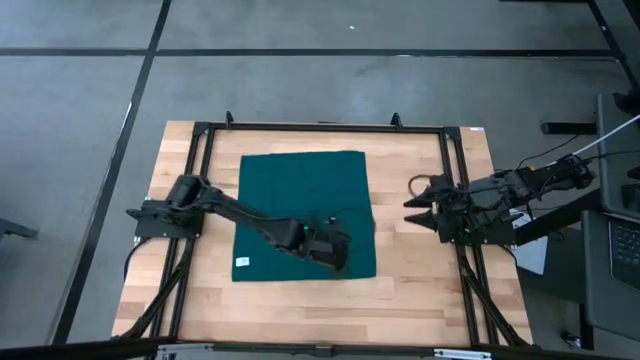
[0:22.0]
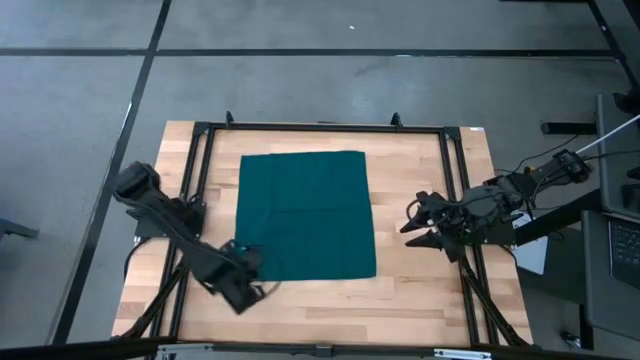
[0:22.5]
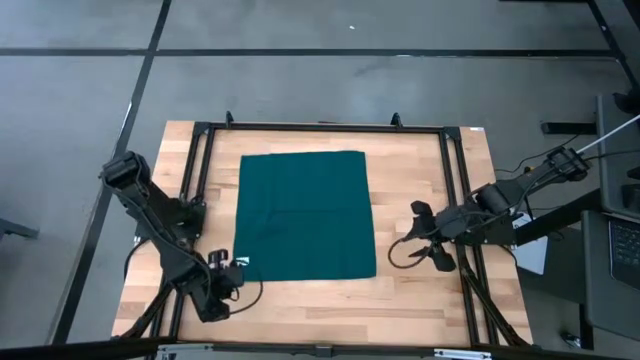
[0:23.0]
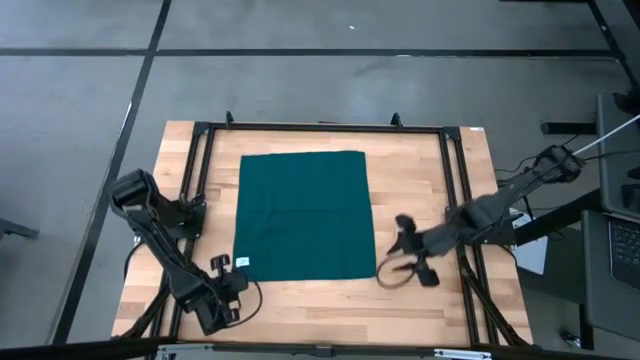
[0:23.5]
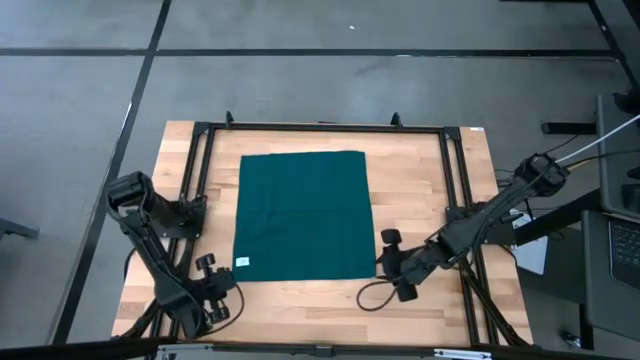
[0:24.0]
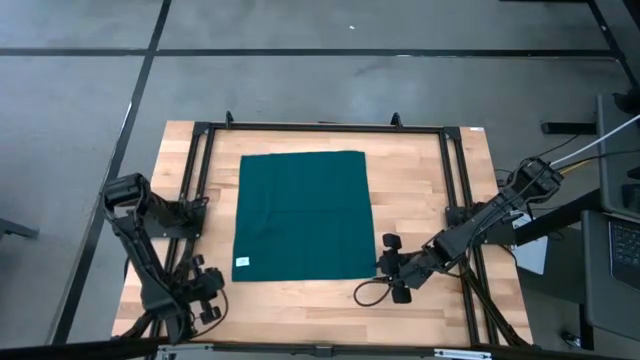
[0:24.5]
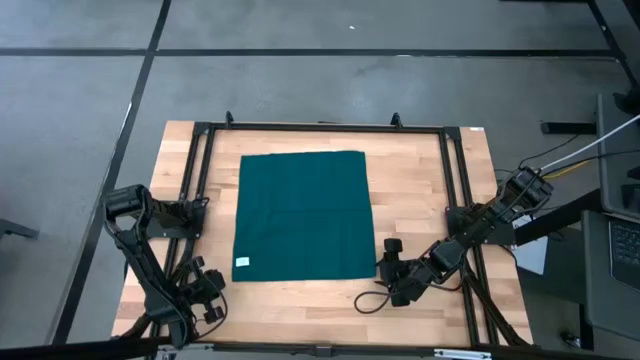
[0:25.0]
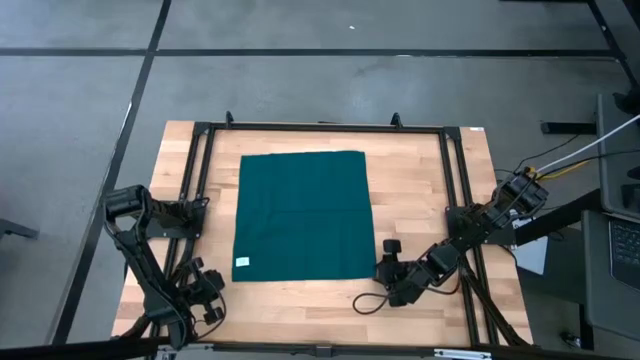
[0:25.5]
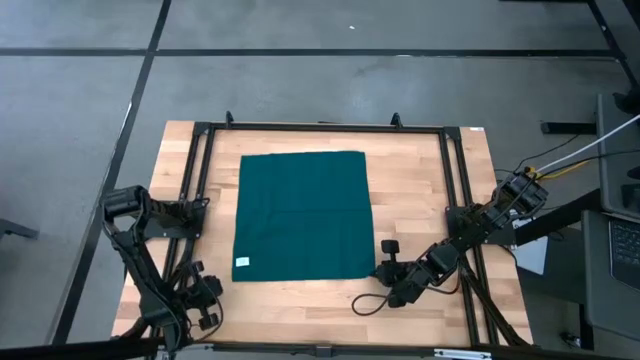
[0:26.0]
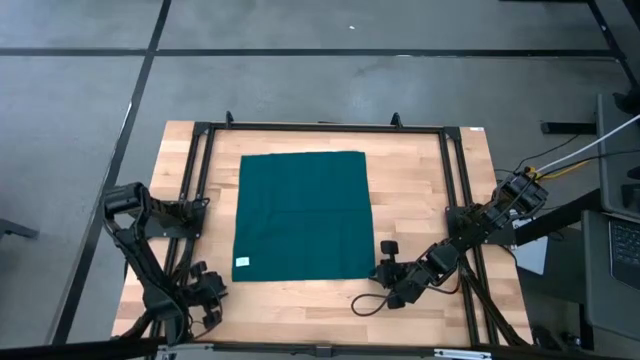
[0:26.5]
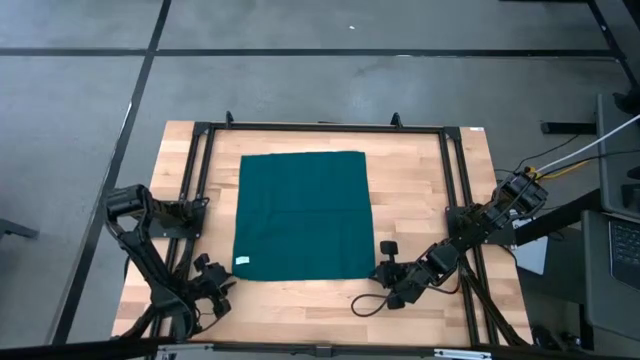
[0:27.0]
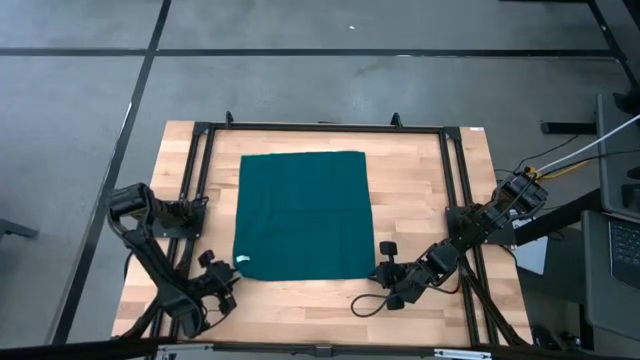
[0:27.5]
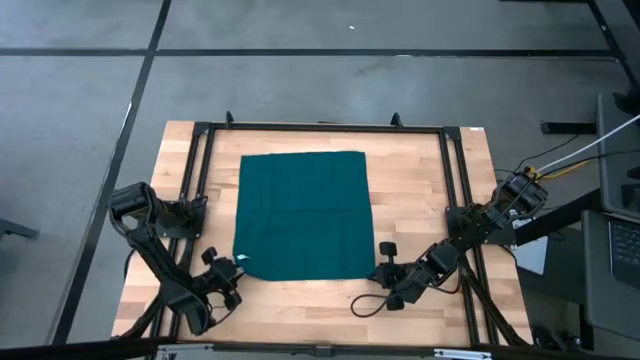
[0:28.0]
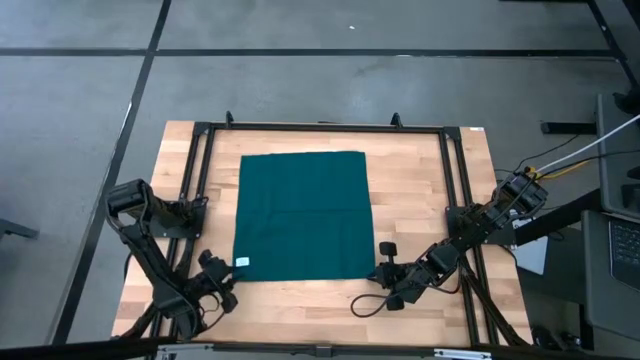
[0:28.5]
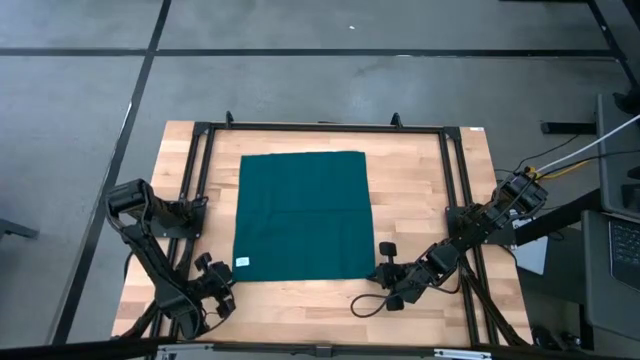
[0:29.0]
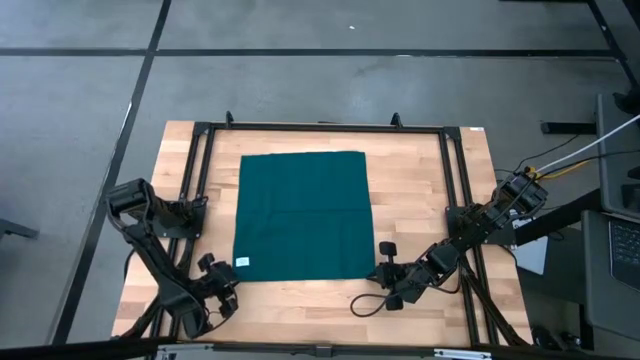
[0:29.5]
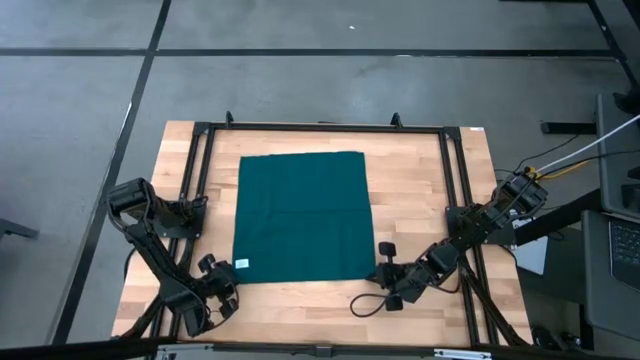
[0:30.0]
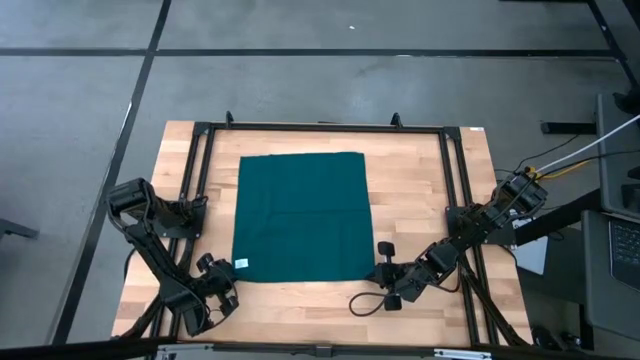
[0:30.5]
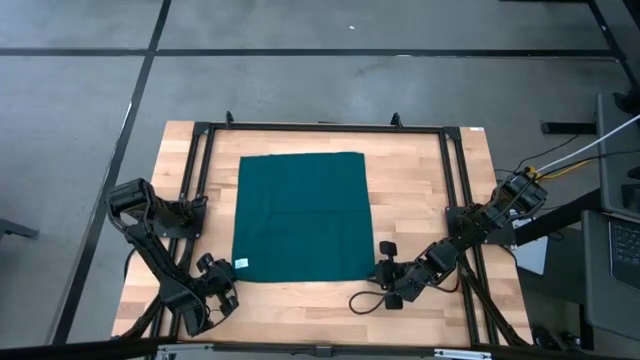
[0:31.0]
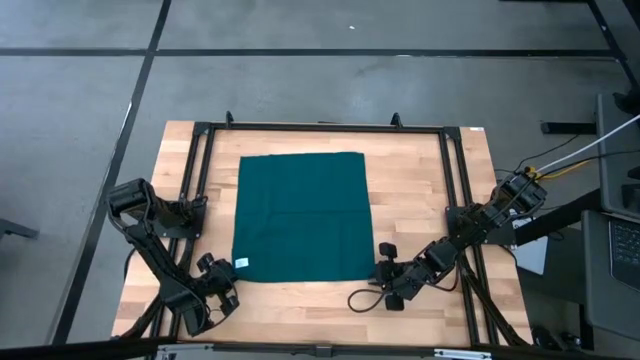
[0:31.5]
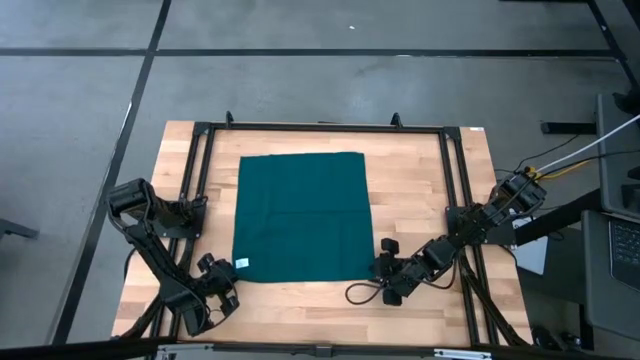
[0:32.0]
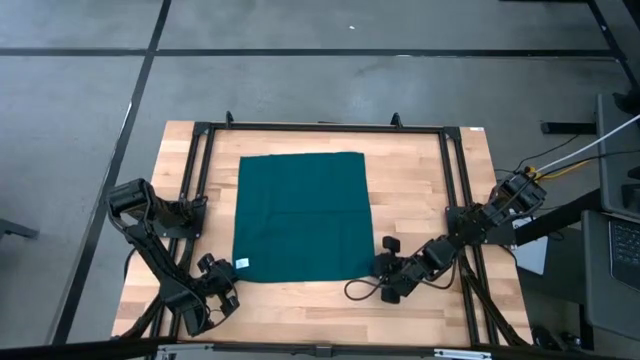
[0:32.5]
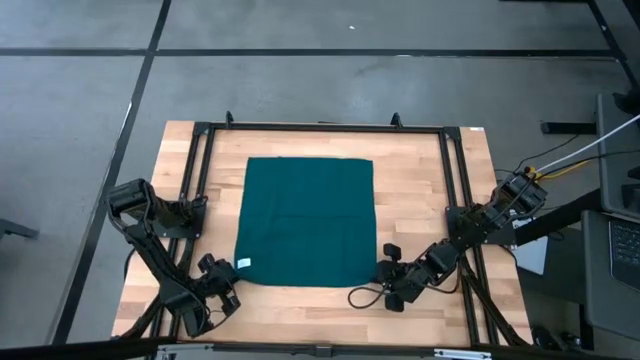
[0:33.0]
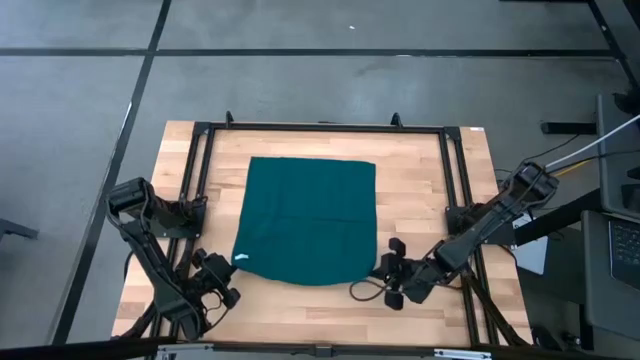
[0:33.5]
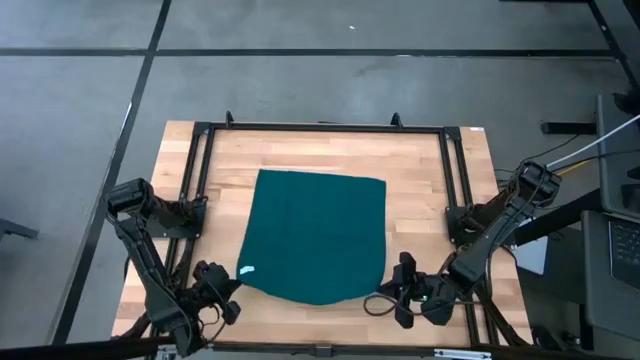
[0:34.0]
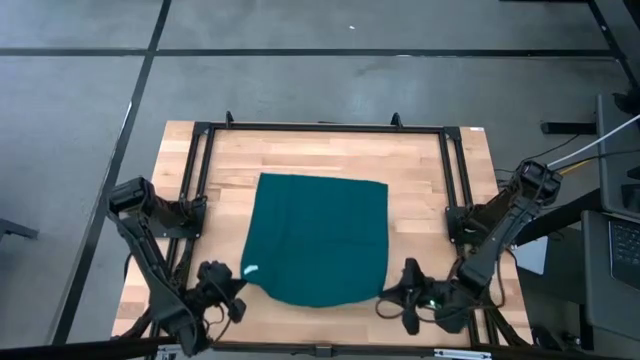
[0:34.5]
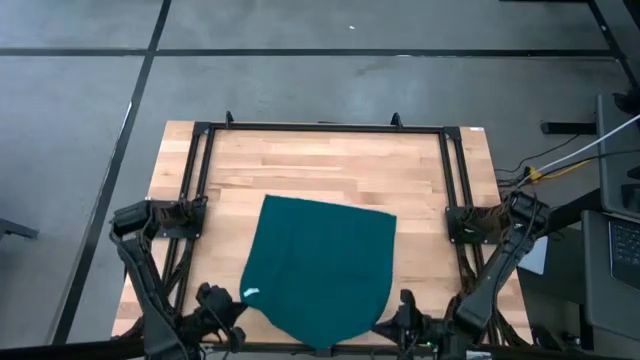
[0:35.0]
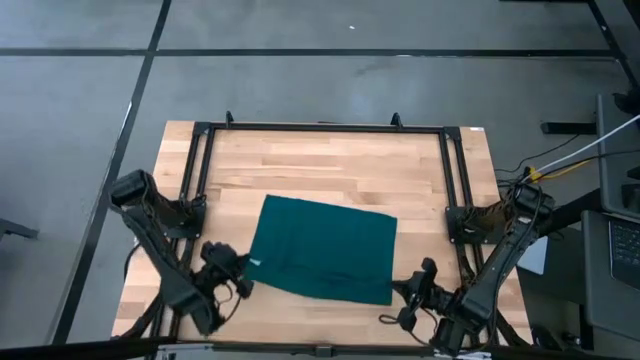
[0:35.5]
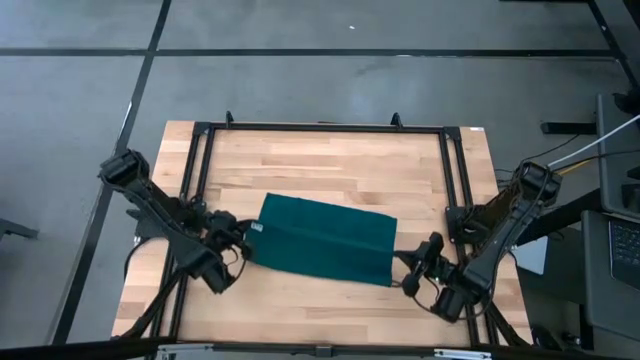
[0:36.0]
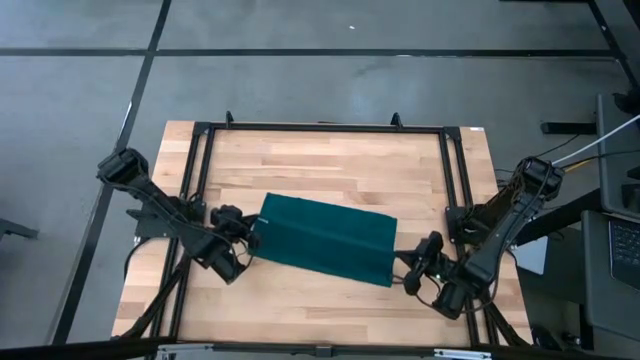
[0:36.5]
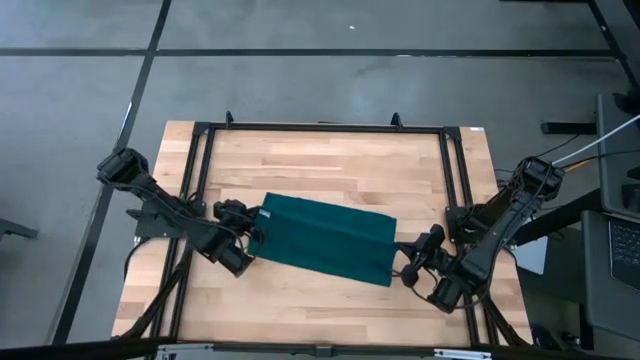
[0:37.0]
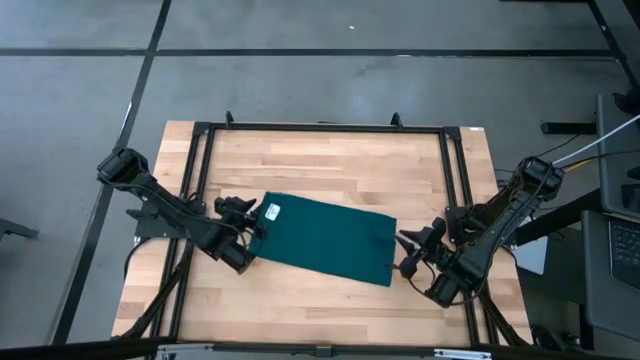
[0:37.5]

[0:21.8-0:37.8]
Task: Fold microfiber towels
Fold the green towel

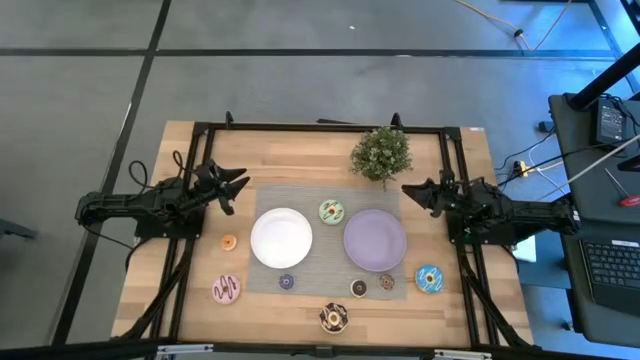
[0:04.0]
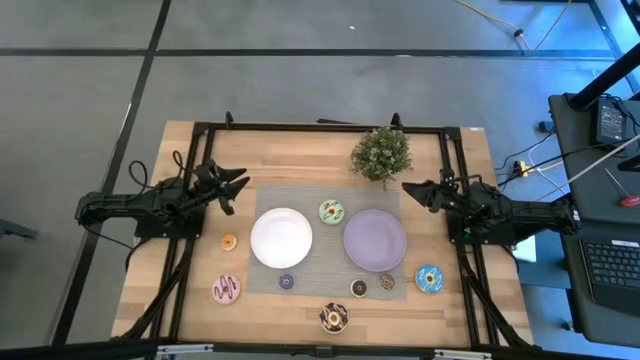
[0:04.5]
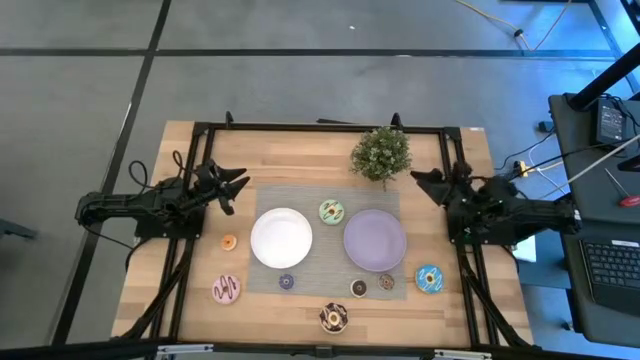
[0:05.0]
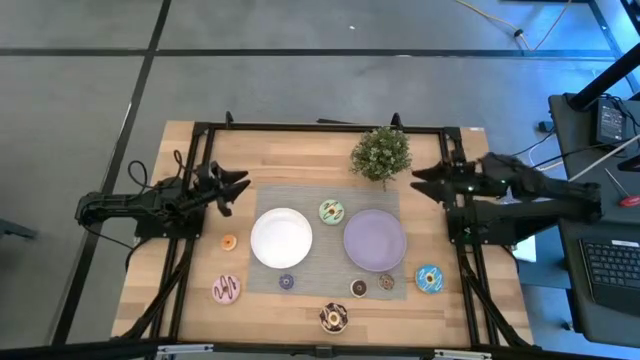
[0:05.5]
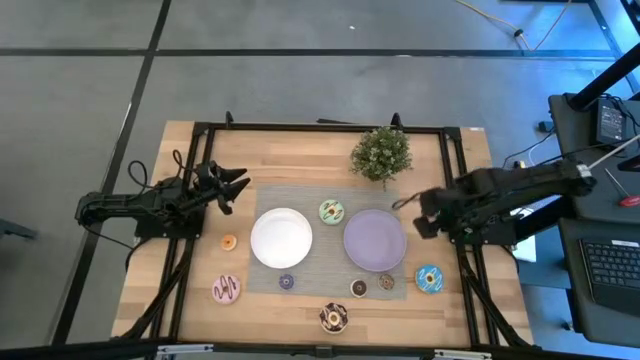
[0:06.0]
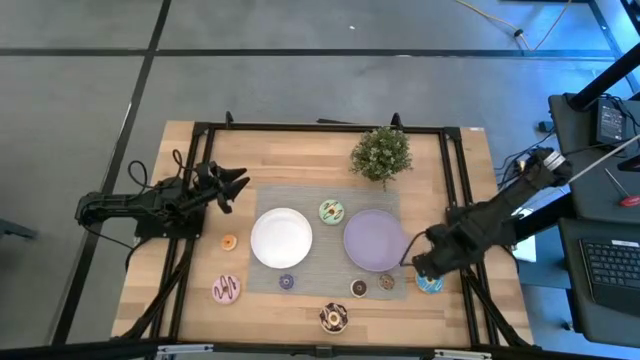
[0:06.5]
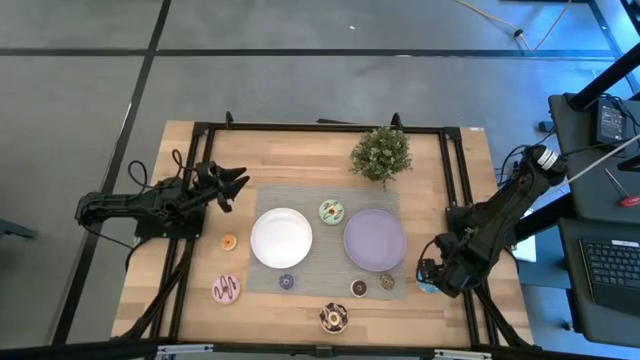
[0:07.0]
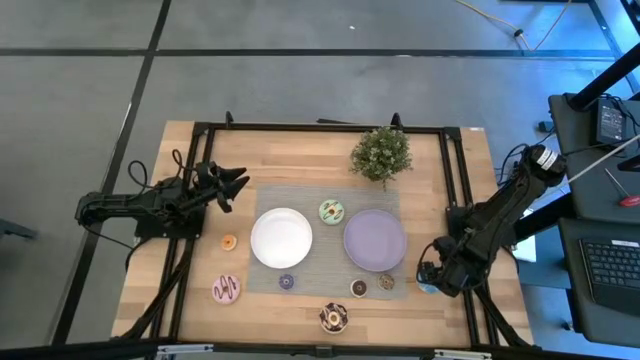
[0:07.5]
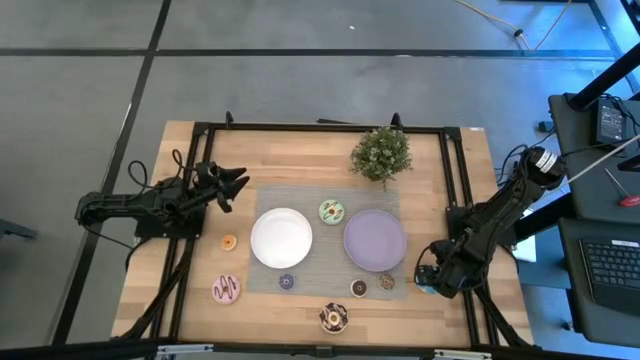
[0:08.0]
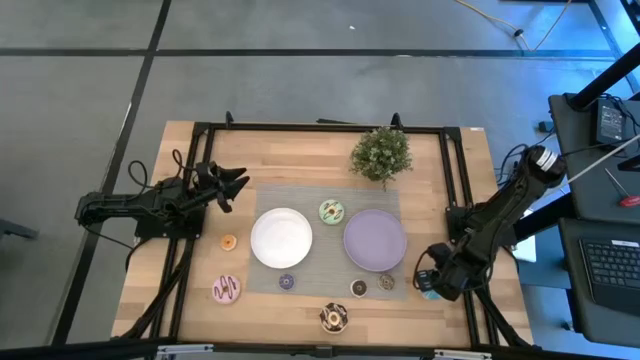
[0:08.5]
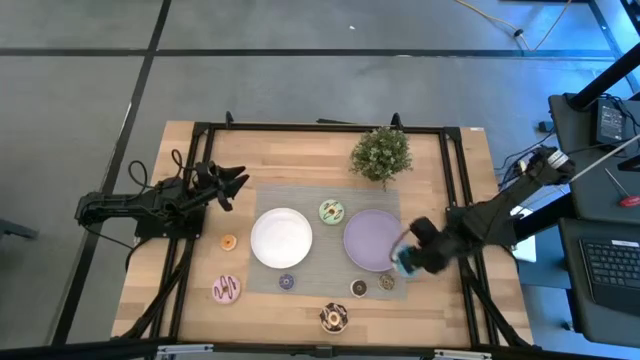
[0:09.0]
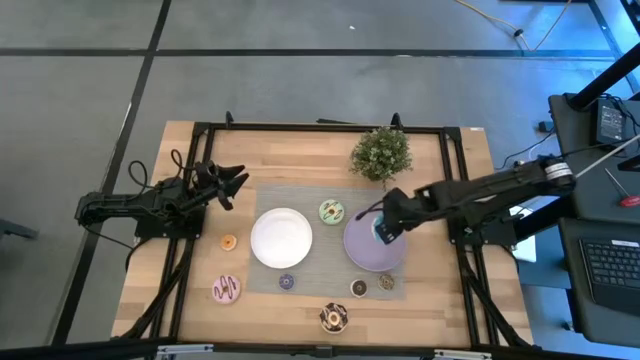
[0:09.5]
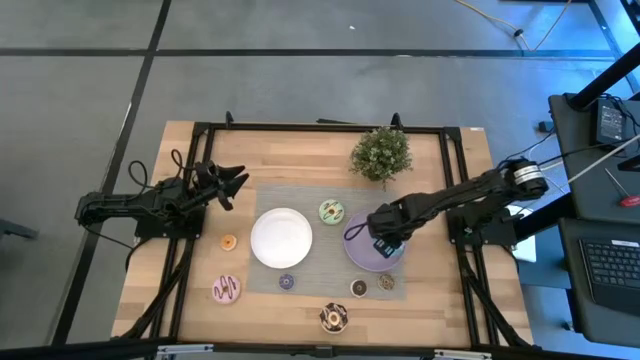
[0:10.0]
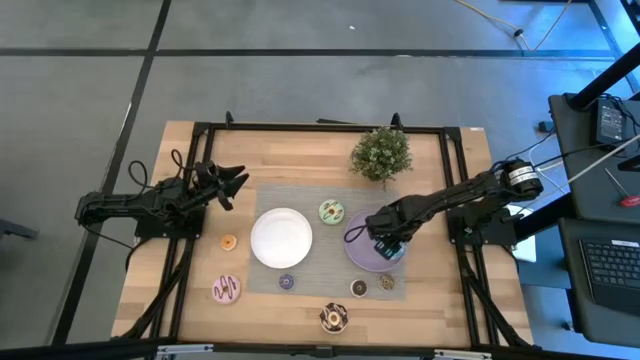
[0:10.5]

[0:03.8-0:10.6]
Task: Pick & Place donuts
Put the big blue donut on the purple plate
